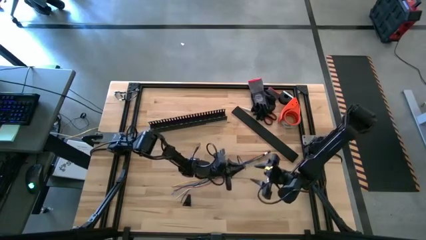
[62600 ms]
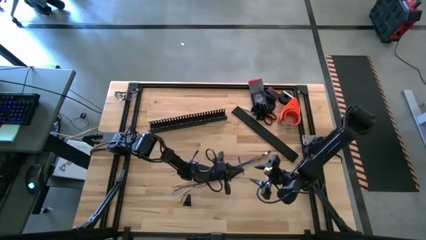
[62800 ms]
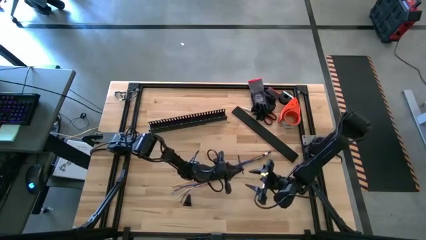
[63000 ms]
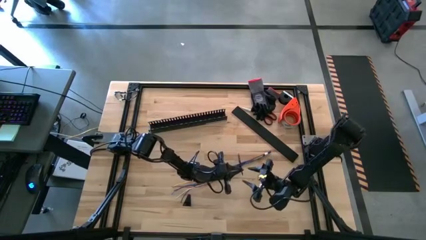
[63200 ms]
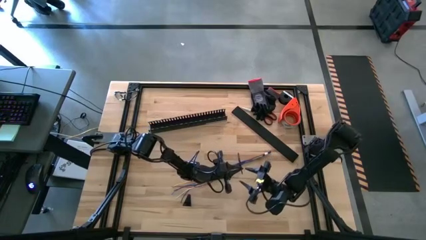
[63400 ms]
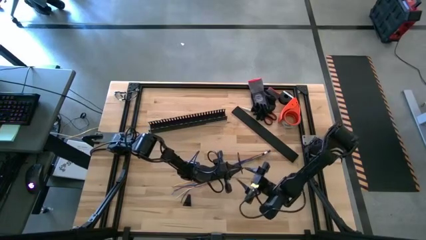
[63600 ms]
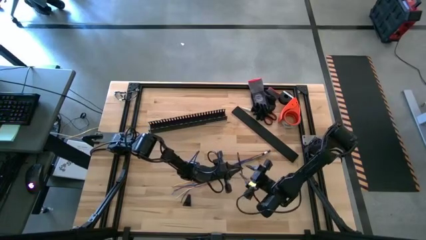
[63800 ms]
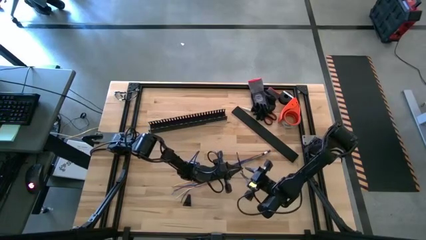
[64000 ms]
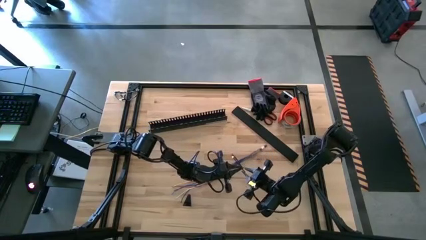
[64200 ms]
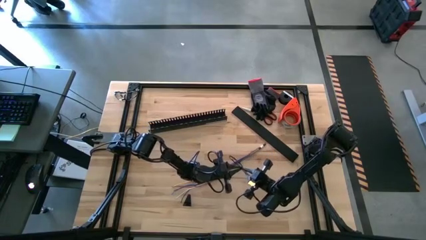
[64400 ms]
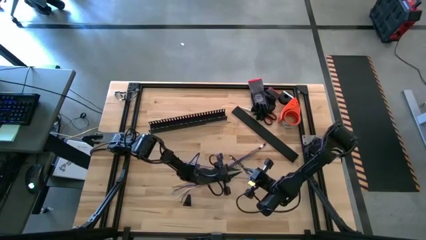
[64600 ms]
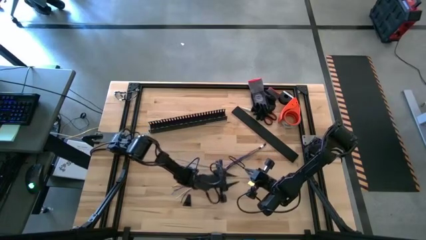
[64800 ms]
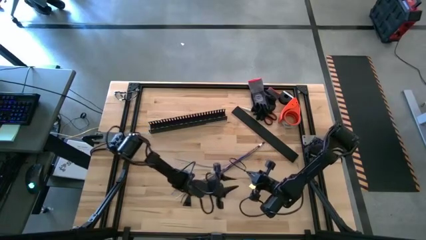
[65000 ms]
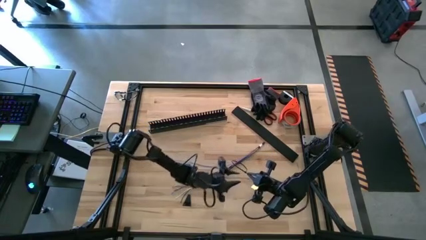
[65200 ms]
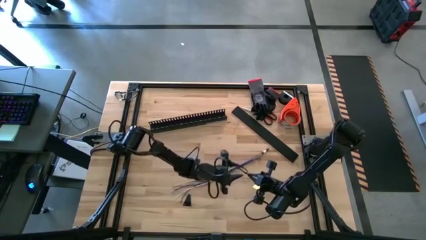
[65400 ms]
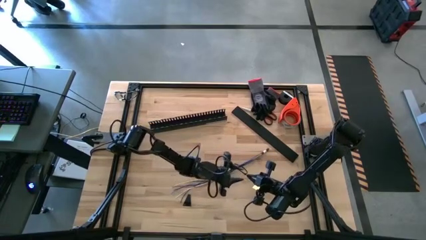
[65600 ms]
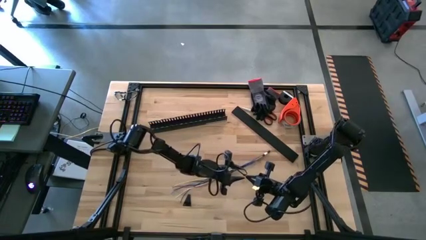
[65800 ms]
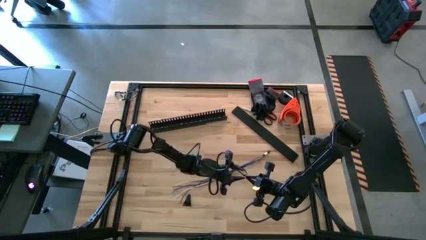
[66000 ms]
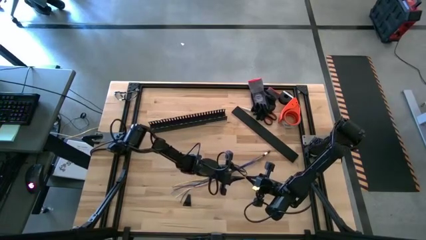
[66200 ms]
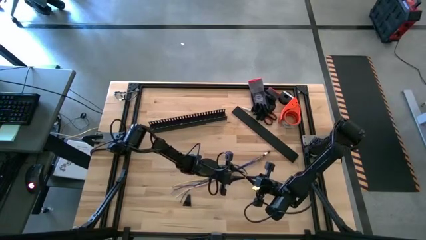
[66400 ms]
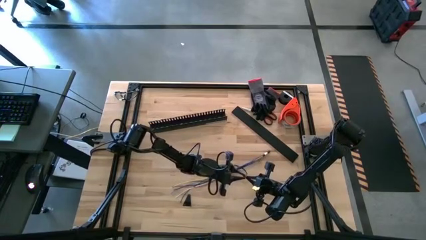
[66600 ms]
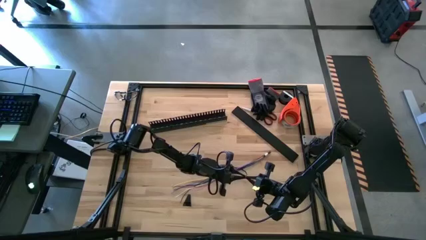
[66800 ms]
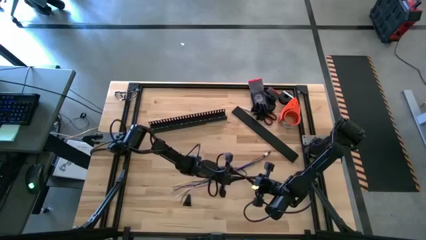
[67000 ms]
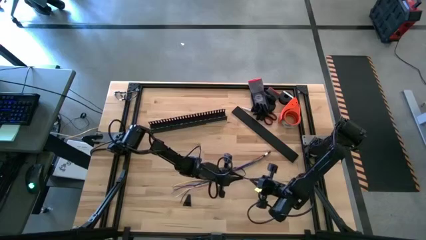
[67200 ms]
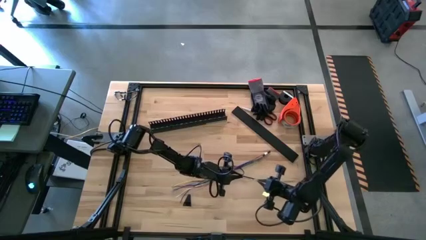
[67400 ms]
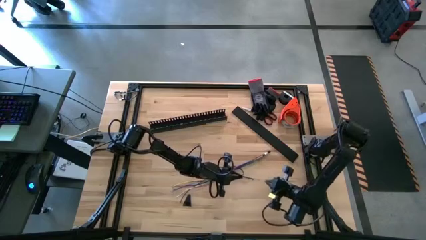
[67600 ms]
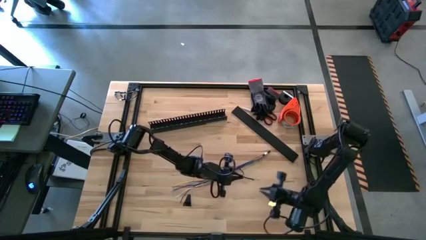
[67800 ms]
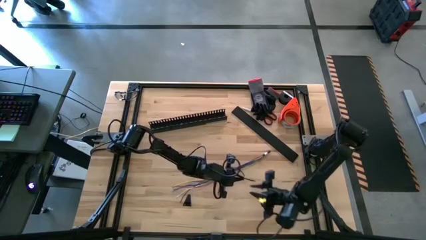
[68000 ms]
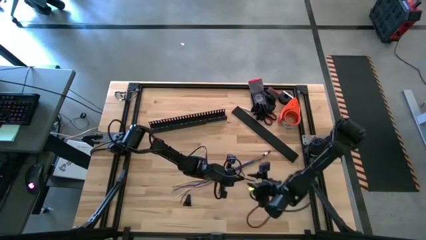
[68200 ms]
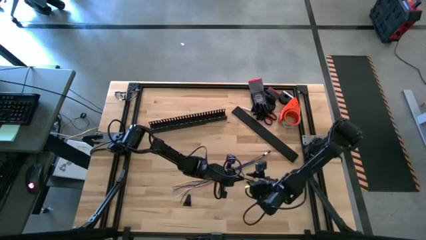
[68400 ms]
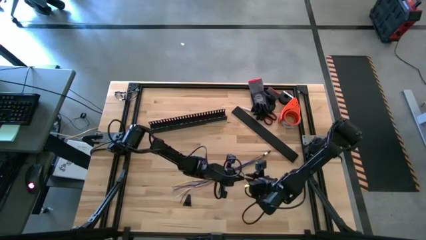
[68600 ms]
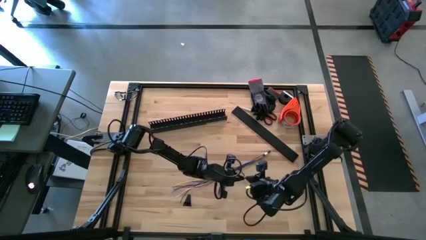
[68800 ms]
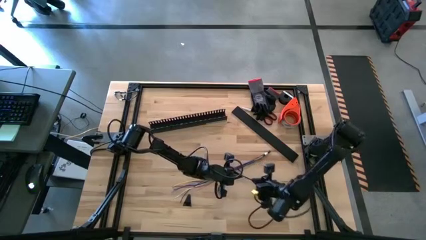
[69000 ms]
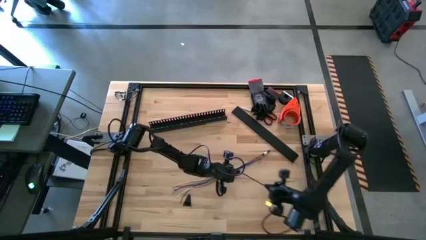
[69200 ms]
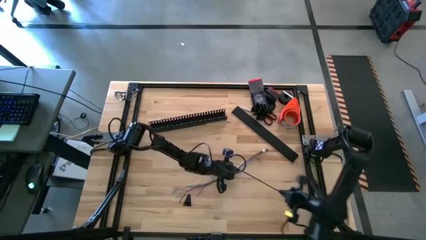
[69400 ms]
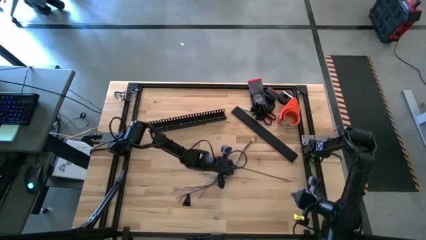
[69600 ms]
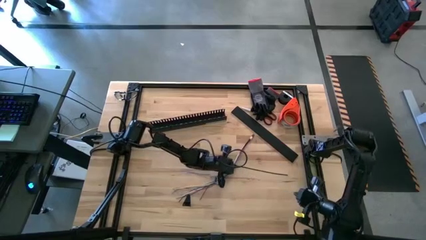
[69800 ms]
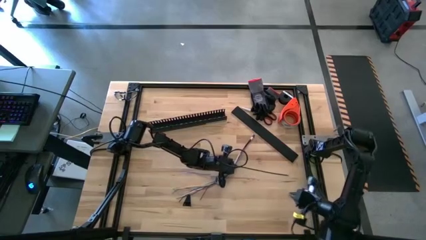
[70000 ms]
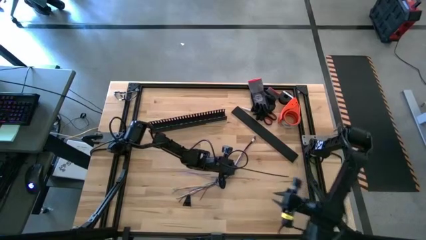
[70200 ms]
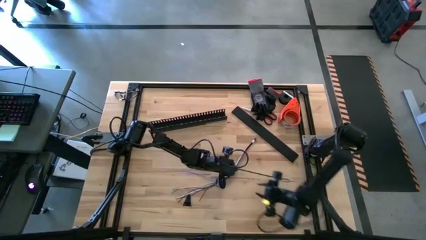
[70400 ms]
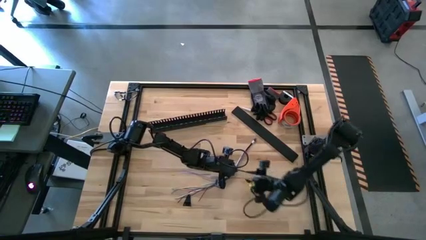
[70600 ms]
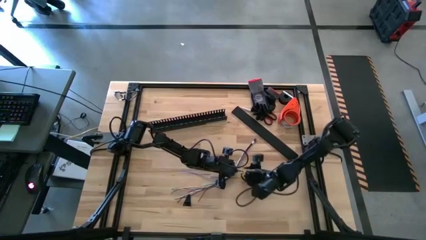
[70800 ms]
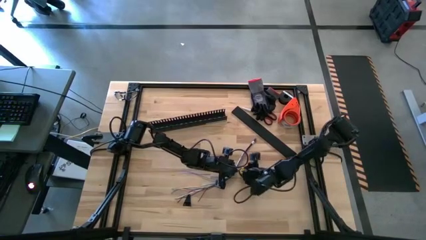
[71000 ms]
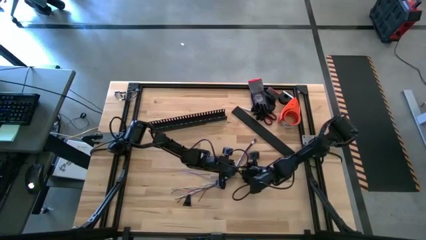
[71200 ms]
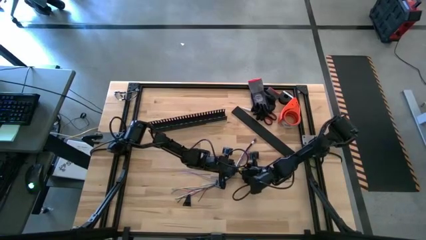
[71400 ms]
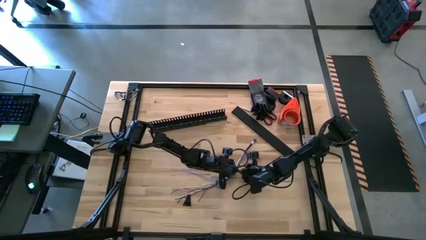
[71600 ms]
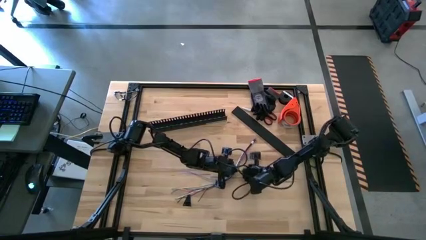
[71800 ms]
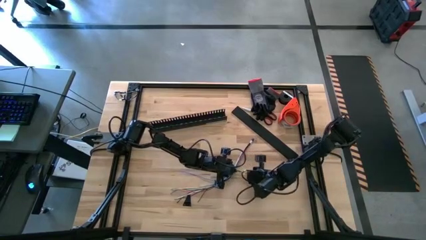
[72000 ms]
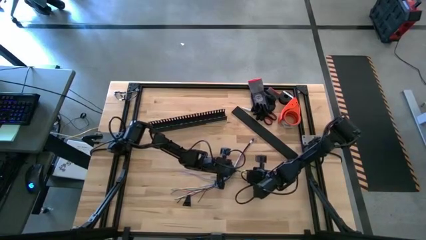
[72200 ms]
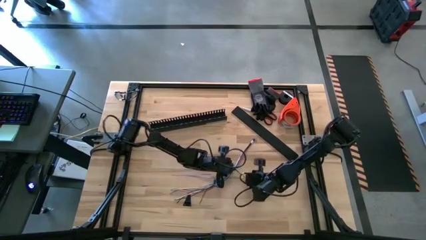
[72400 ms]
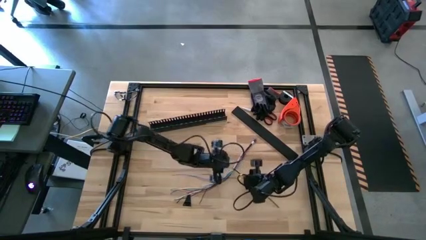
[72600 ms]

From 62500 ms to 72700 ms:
Task: Ziptie cables
Wrap the colored cables together using a zip tie

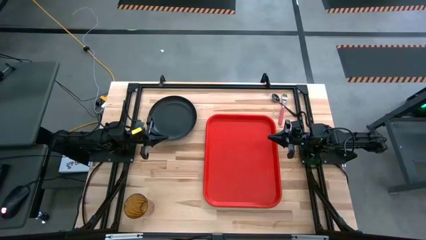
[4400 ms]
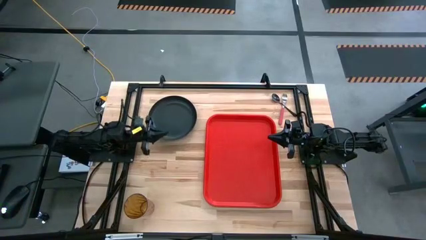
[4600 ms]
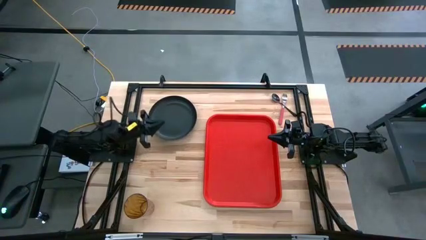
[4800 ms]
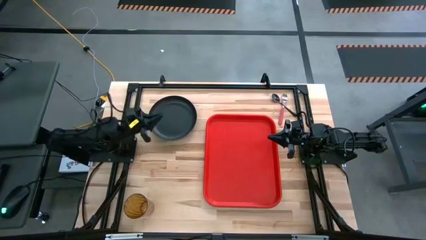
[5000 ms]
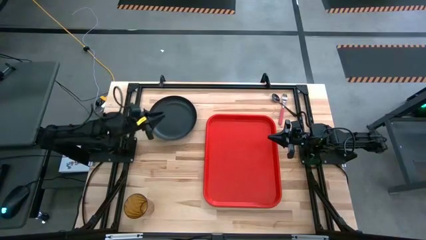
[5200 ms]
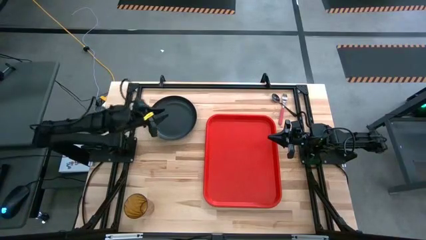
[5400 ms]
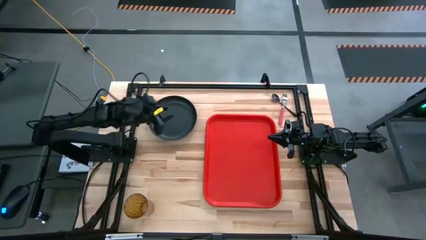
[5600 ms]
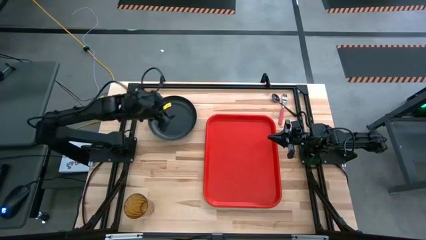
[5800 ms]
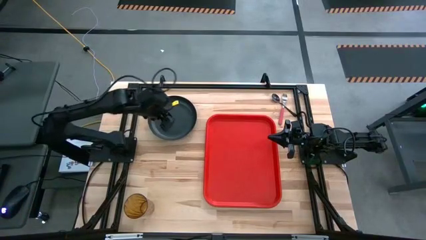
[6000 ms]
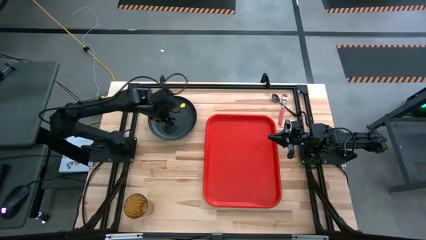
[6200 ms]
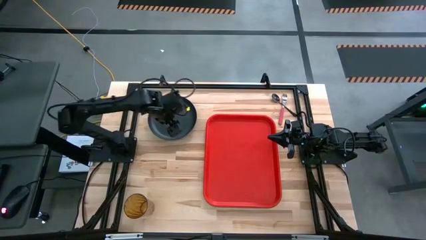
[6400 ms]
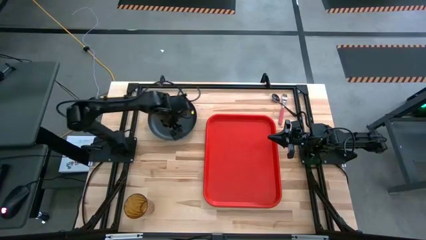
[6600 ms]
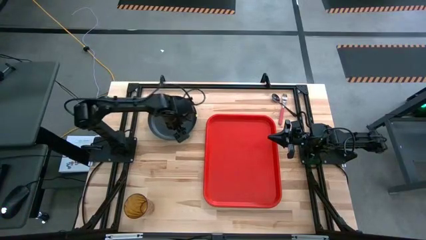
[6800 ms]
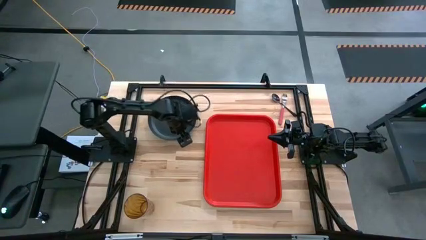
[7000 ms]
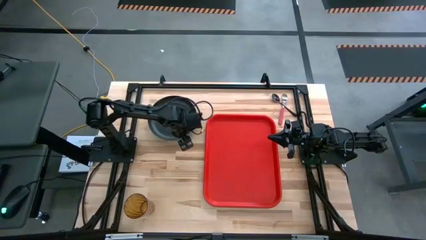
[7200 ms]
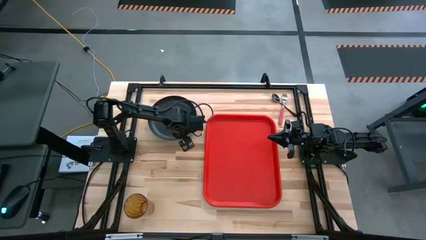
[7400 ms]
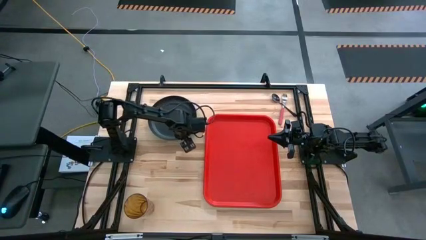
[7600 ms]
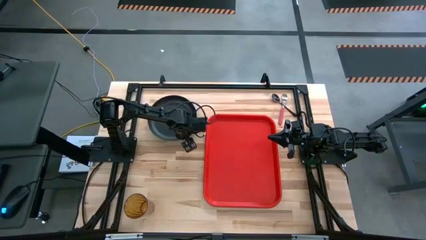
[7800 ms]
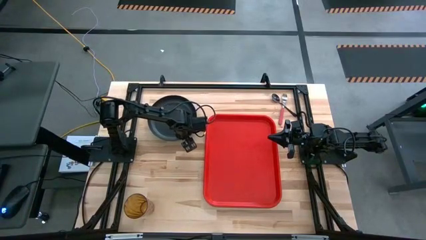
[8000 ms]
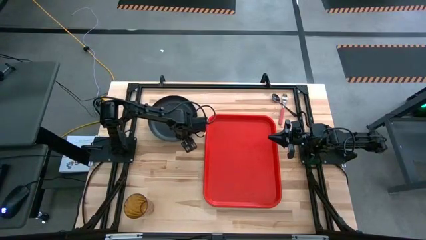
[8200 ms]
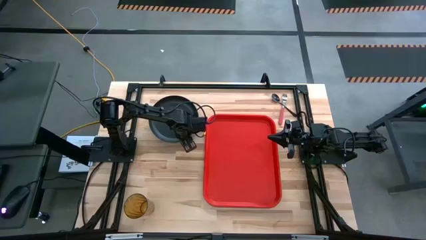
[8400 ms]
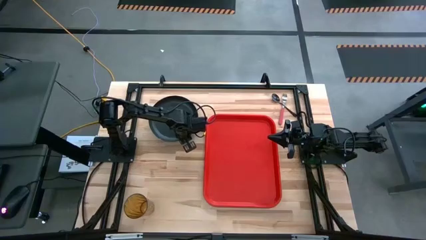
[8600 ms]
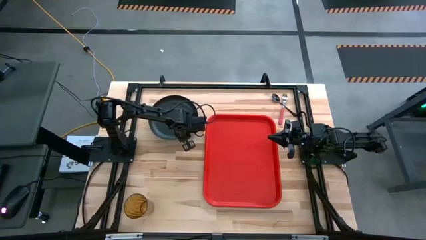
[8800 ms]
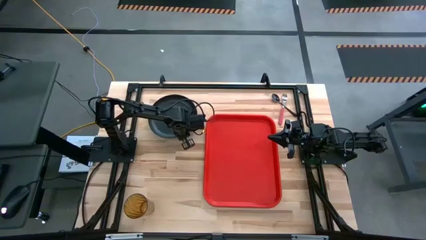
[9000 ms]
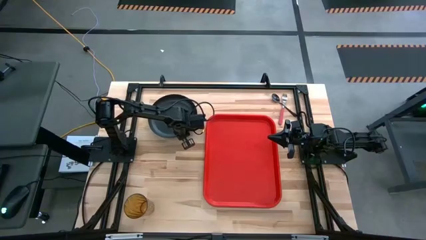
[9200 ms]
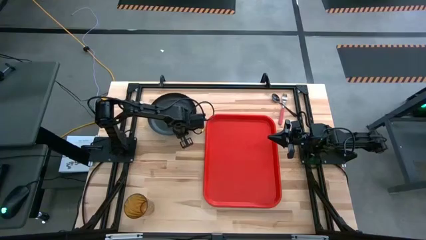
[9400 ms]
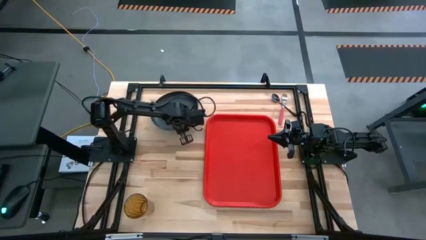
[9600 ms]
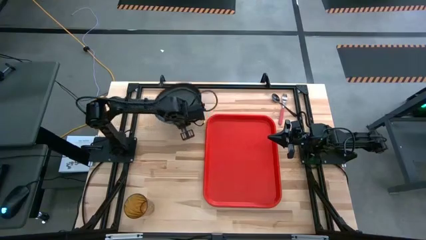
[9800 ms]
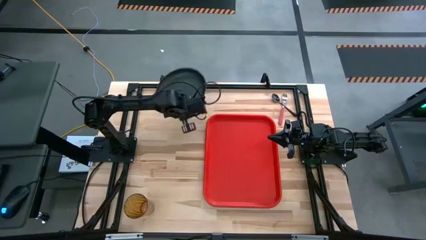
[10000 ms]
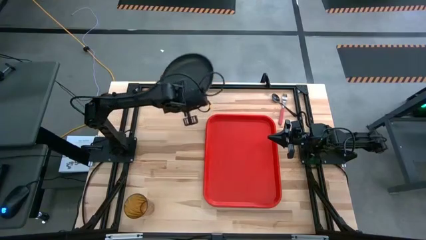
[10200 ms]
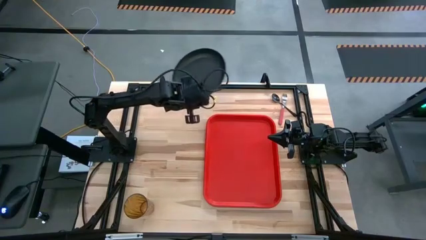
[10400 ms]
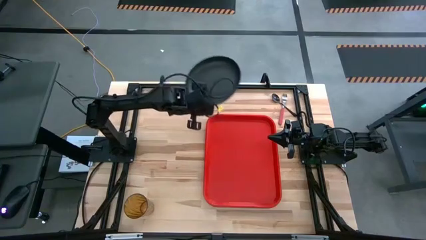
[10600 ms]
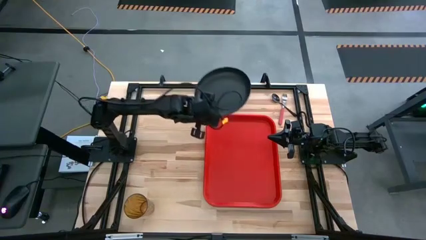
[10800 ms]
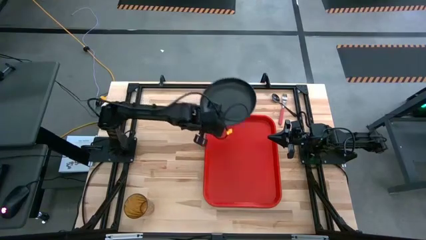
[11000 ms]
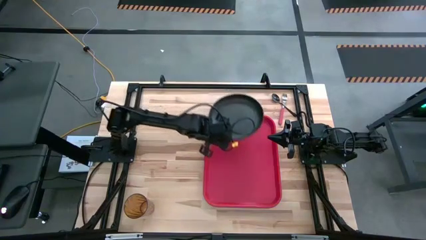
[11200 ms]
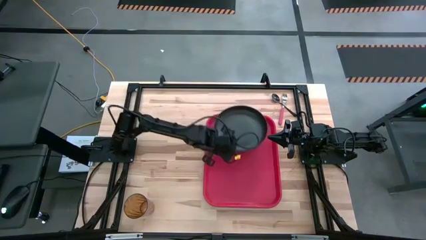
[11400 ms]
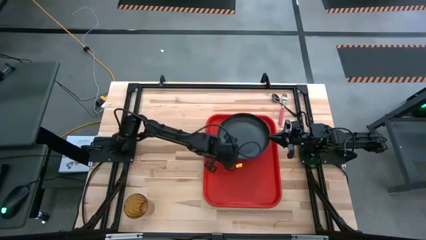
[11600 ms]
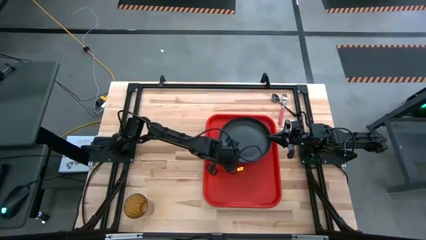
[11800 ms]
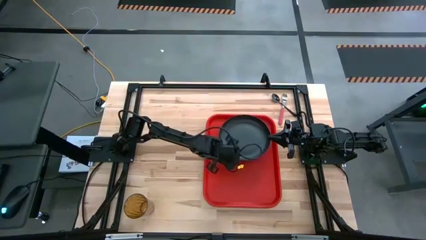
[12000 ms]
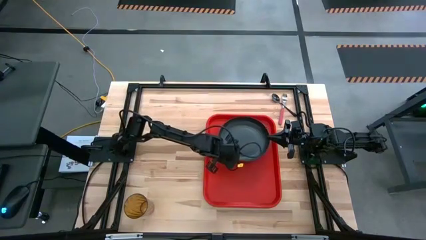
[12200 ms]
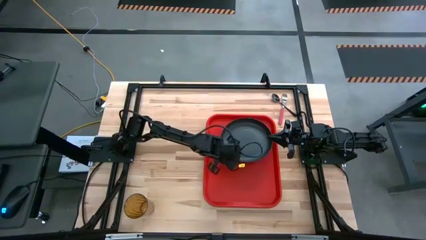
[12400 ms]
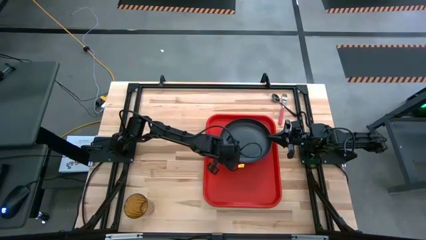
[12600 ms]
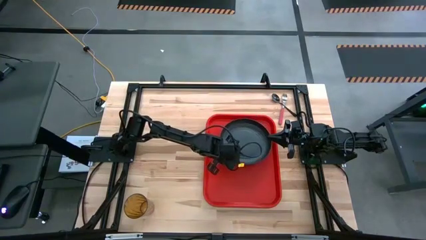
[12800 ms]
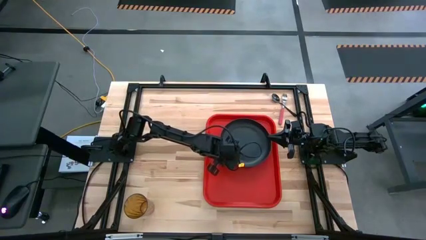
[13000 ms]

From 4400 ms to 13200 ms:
Task: Pick and place plate/cup/fork/spoon on tray
Put the black plate on the red tray
